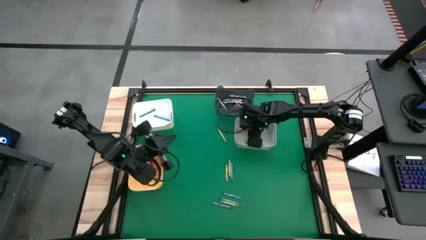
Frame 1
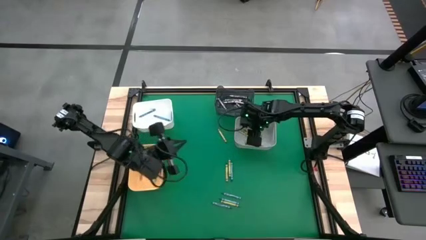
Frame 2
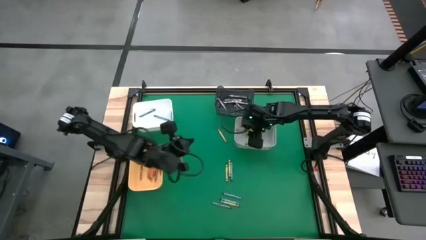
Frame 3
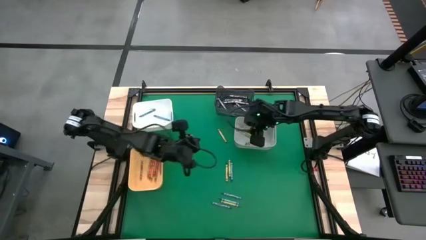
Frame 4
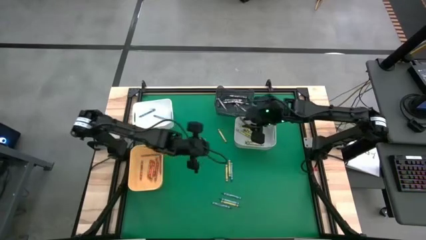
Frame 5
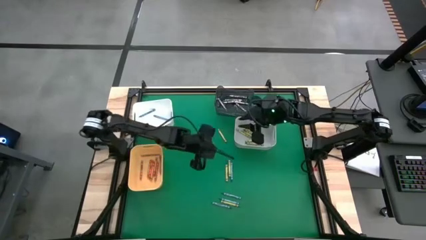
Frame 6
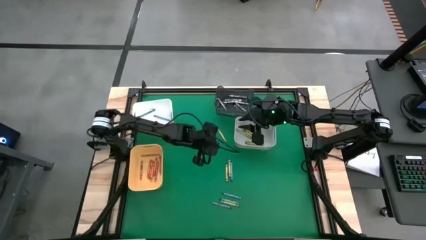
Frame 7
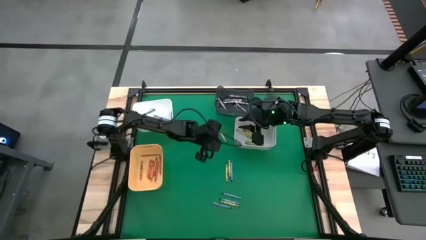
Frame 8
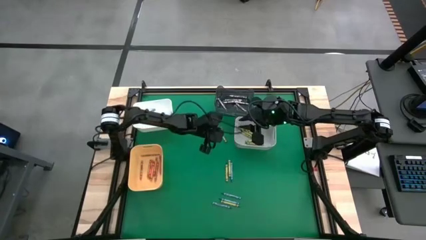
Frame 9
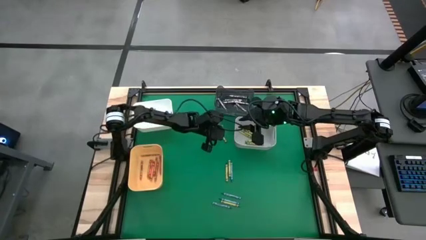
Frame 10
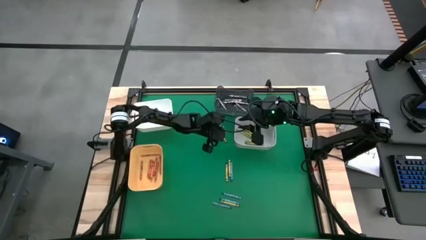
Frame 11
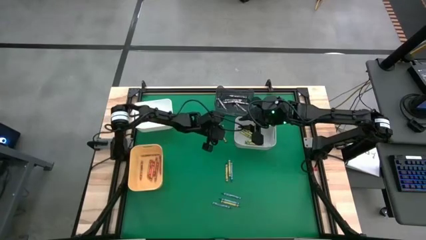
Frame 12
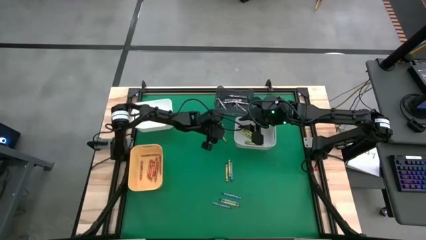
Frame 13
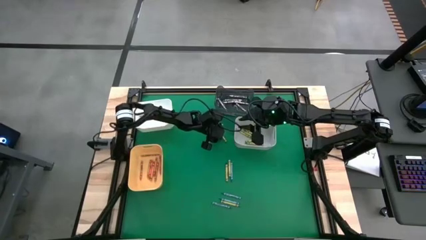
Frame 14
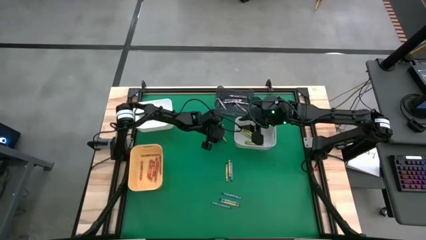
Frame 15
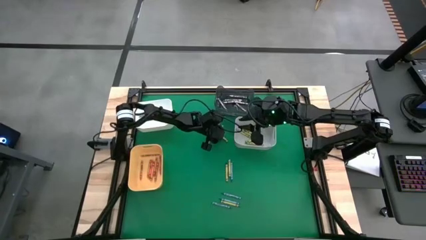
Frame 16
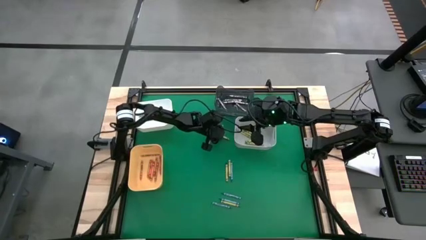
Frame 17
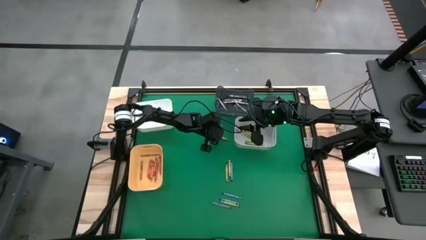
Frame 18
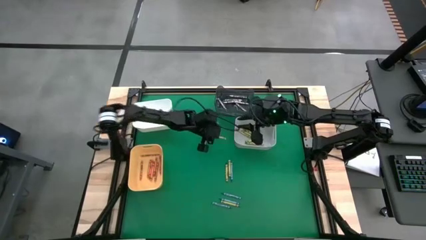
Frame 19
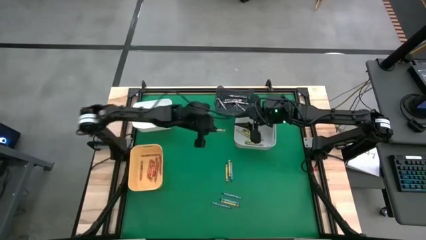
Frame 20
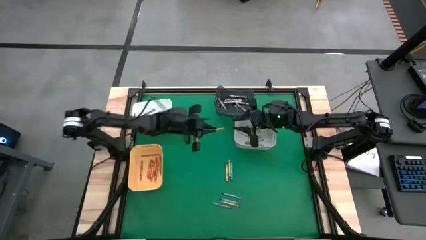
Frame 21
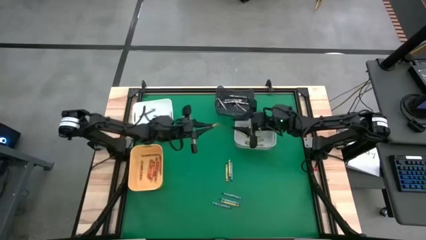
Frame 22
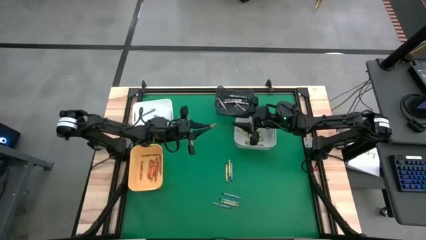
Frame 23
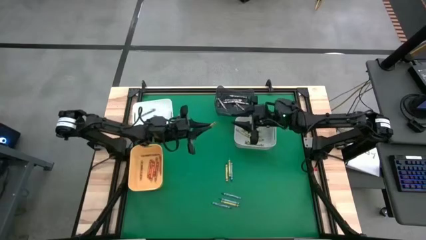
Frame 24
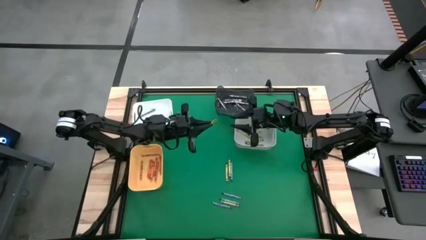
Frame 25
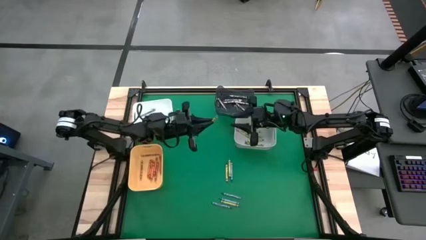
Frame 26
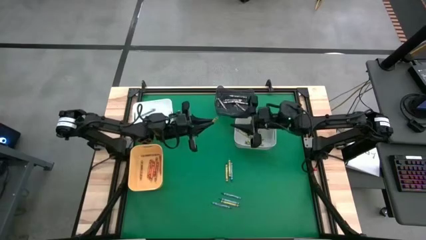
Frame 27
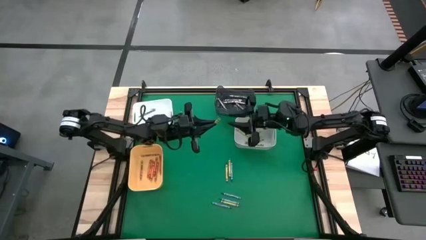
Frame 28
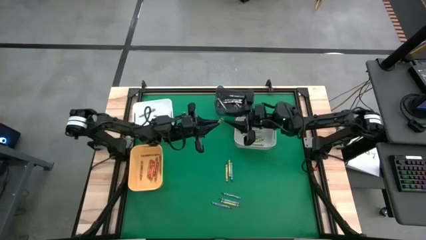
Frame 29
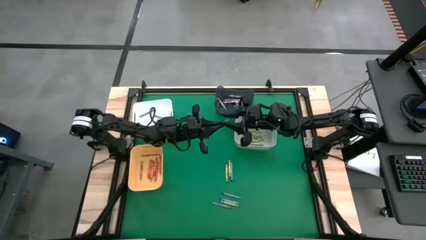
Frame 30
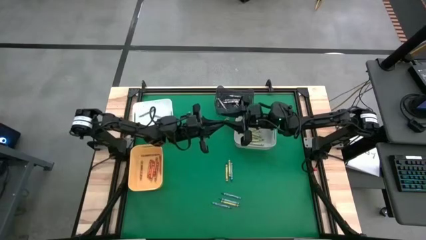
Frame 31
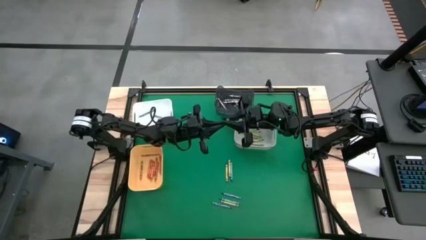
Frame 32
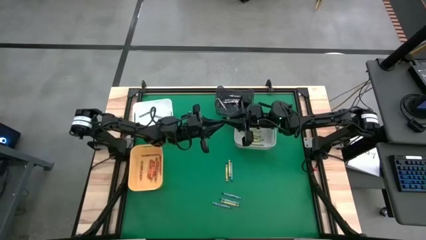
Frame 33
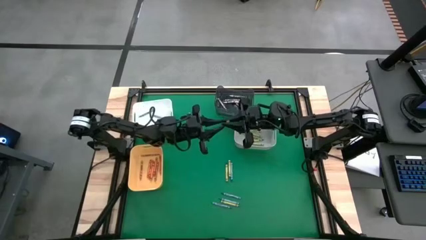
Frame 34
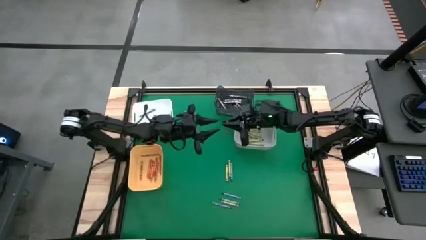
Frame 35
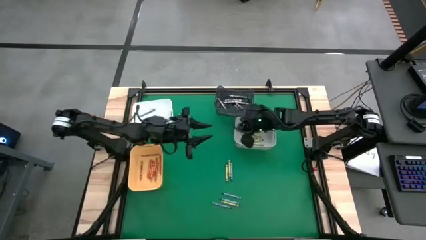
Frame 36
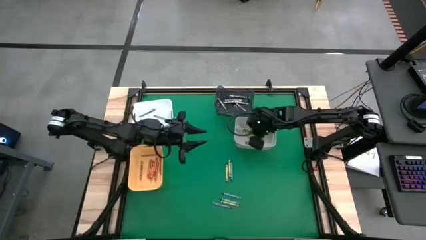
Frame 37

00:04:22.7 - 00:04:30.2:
Task: Sort crayons
Put the green crayon into the gray bin

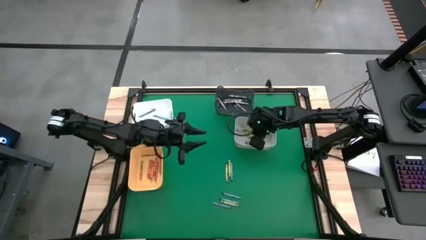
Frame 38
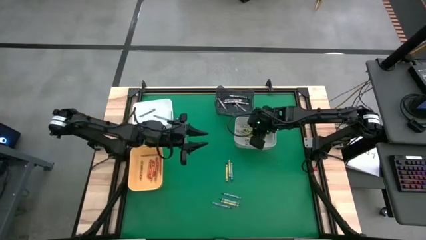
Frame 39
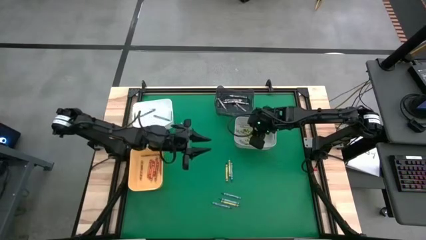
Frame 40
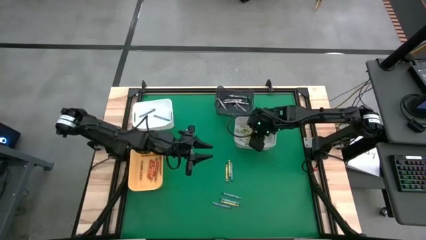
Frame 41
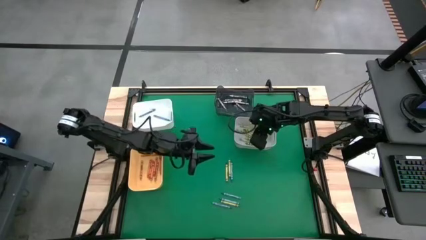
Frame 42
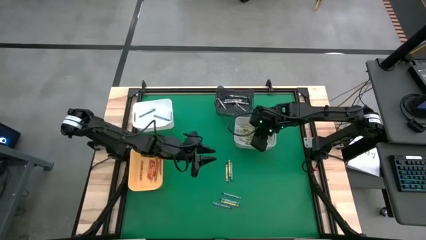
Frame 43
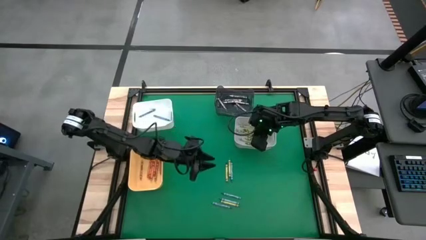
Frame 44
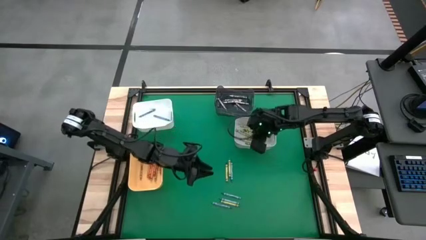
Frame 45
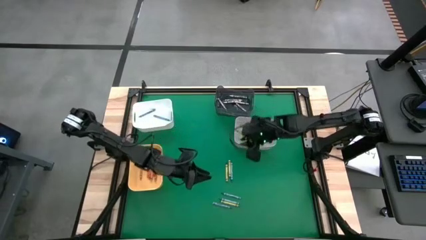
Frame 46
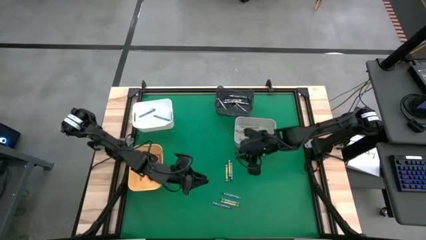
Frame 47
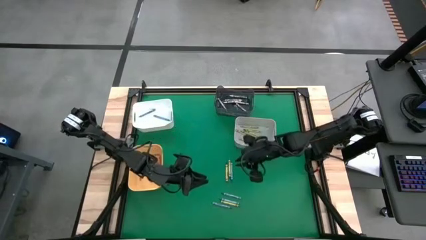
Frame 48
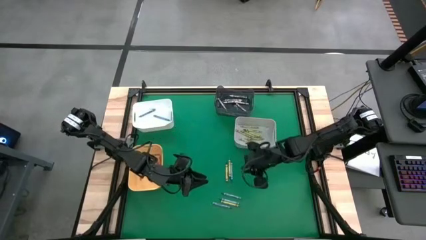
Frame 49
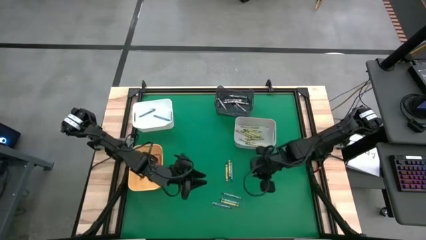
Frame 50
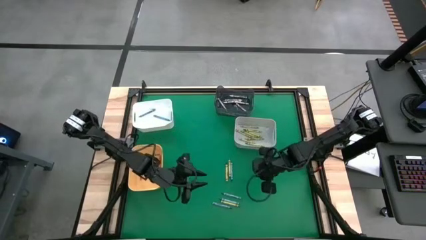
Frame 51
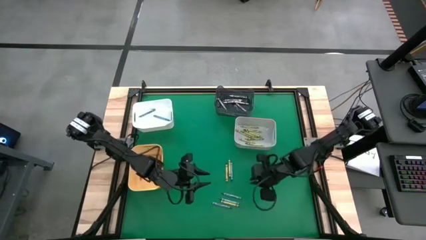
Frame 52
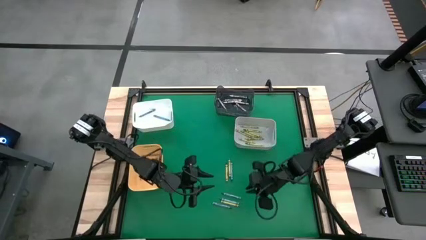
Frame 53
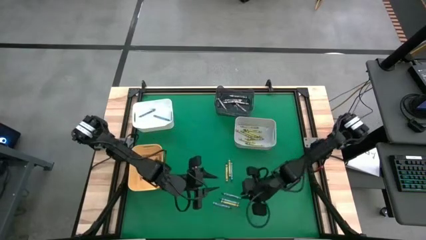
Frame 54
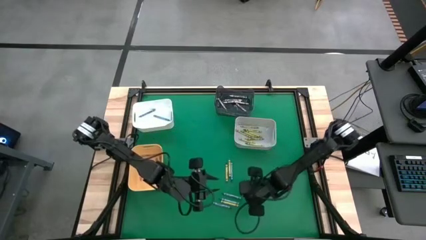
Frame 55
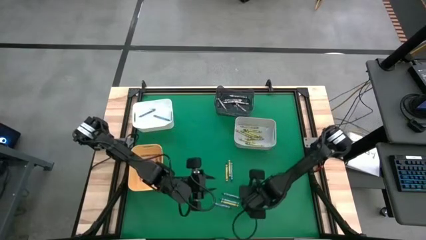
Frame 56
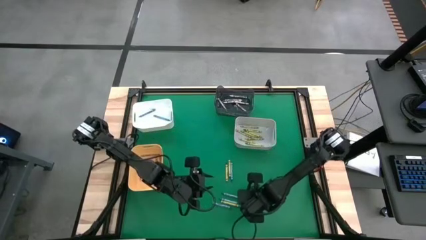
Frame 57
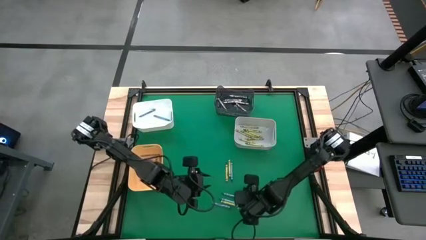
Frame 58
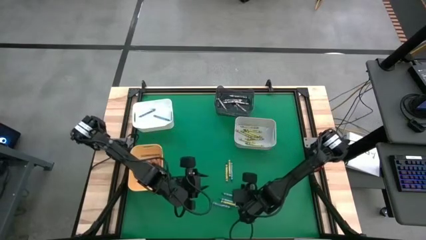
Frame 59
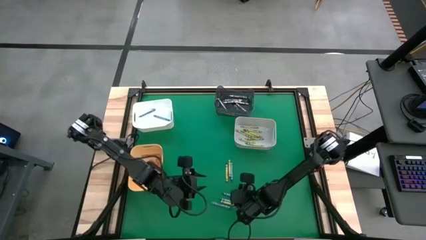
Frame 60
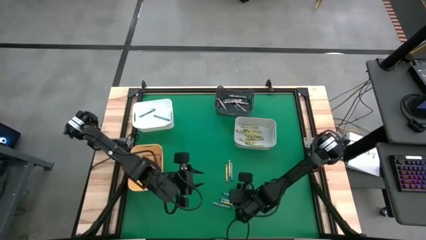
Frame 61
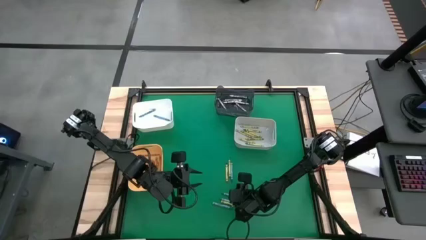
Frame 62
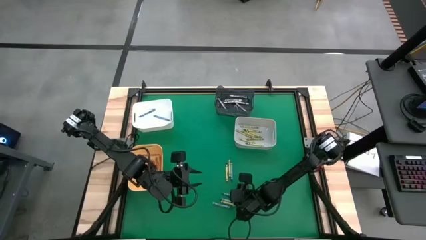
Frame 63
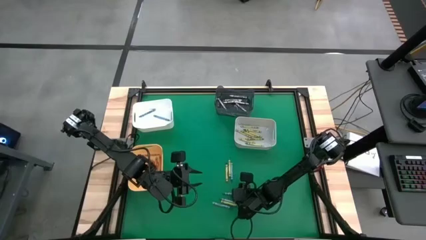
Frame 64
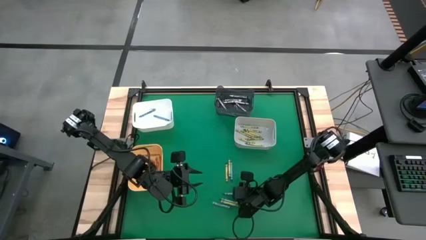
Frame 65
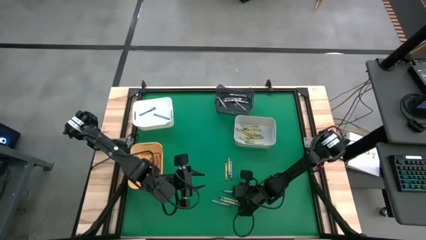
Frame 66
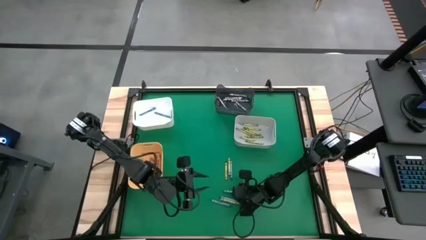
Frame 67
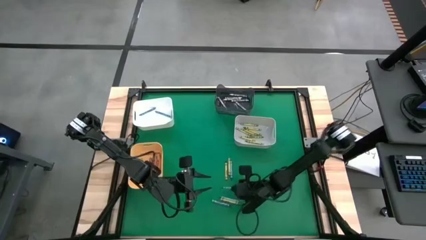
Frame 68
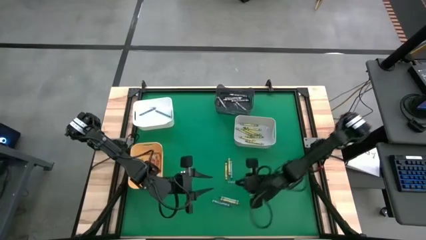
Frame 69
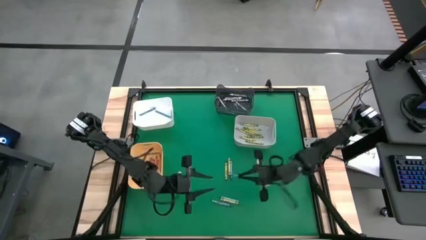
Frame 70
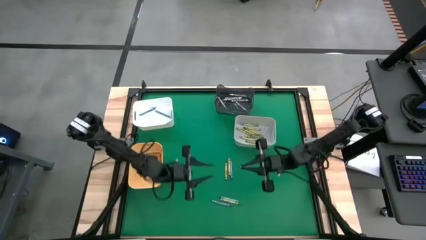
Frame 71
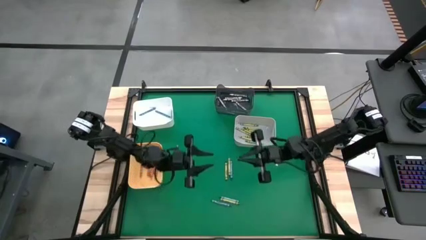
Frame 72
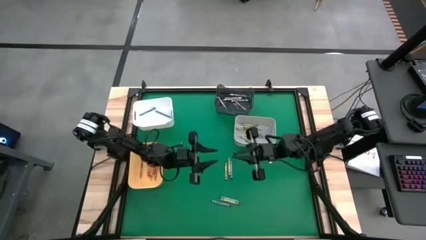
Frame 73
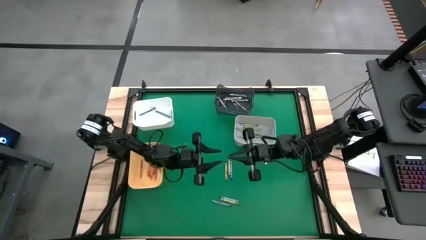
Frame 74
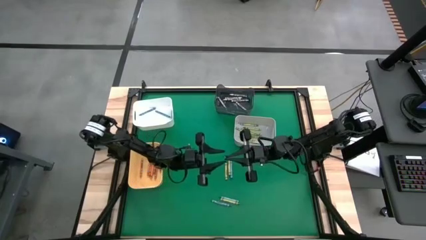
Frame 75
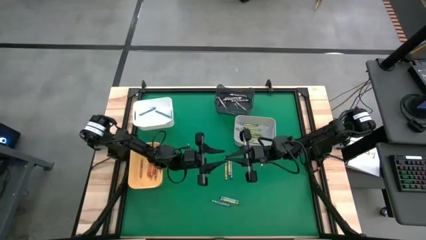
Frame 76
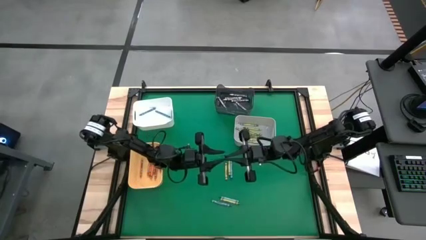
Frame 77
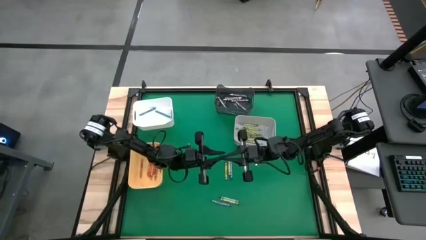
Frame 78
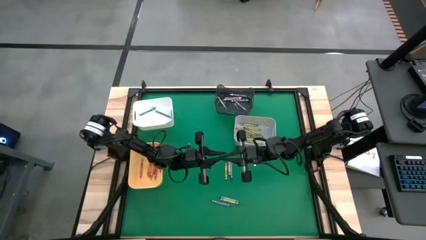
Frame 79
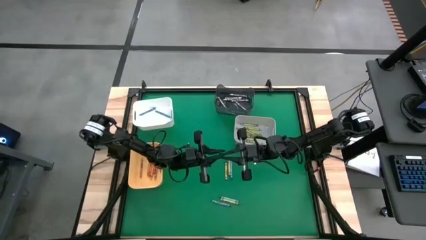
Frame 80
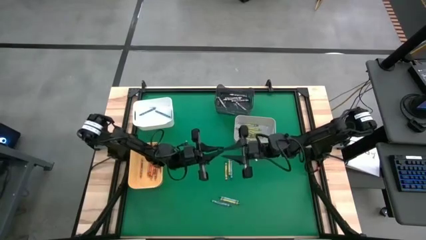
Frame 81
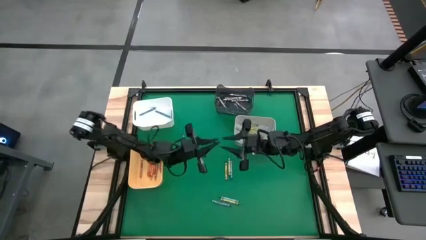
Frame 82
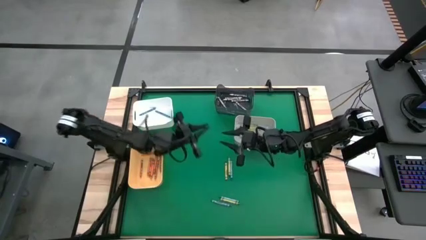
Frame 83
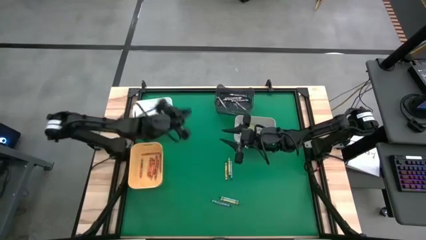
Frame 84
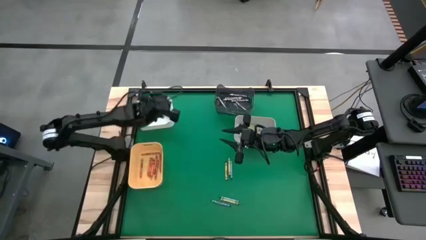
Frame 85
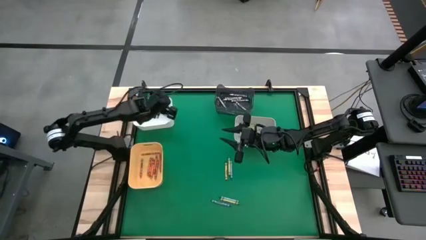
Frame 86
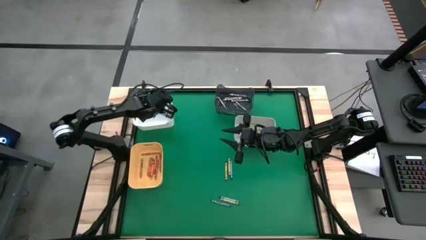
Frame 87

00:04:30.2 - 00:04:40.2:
Put the blue crayon into the white bin
